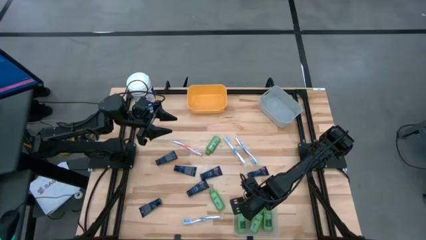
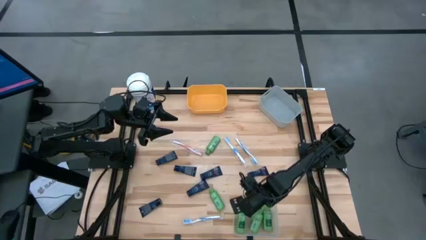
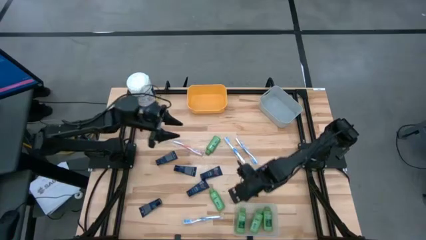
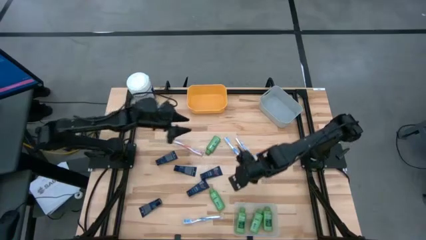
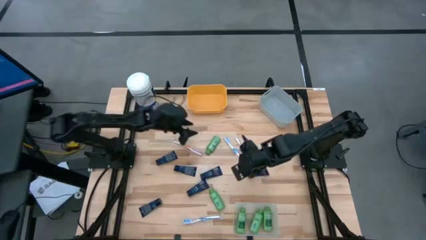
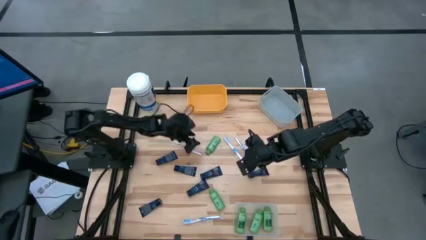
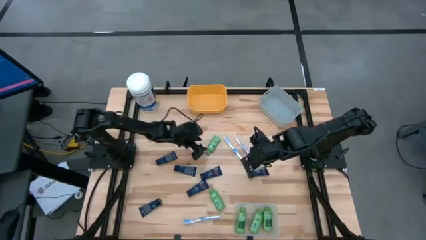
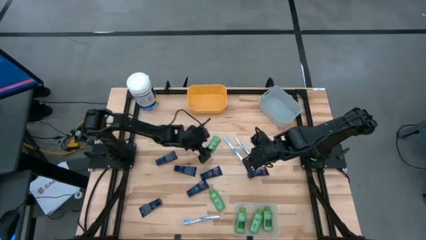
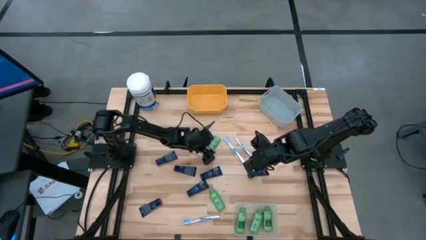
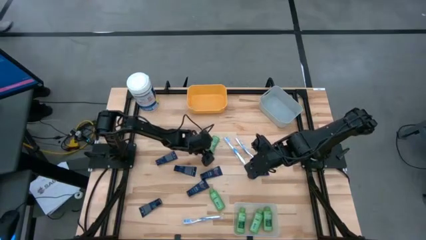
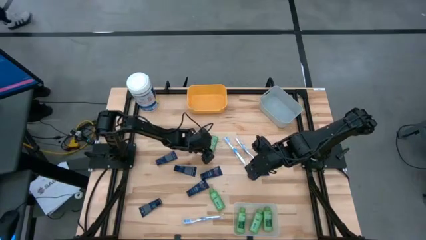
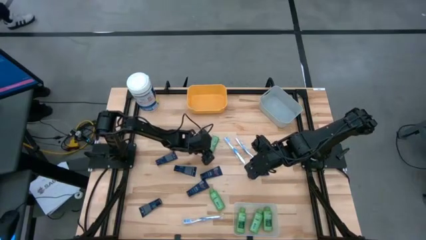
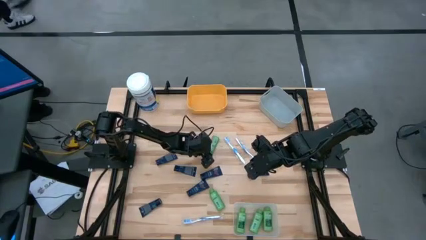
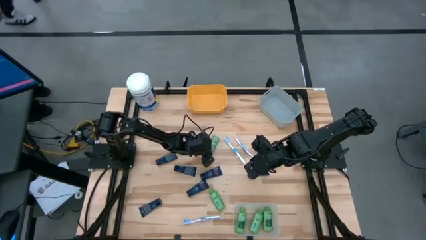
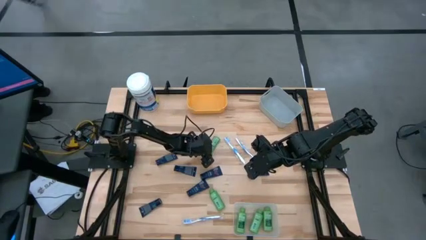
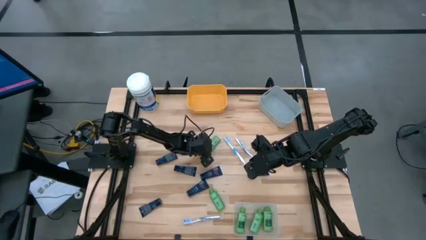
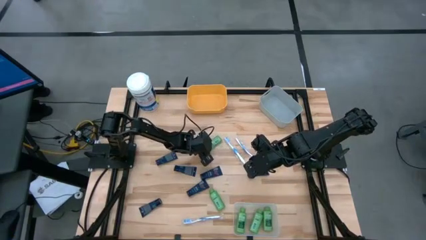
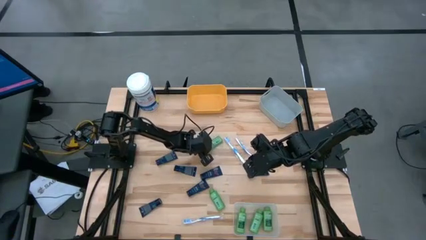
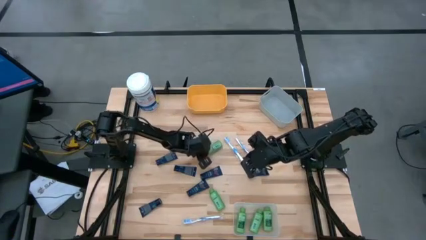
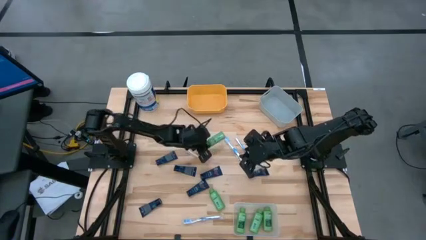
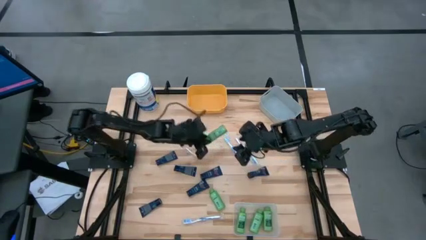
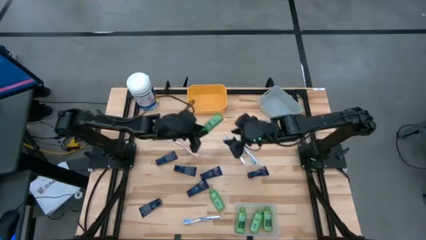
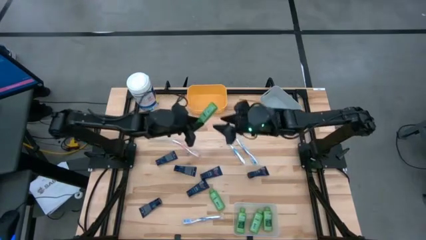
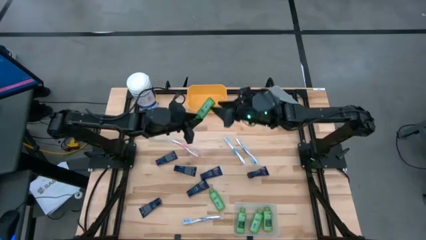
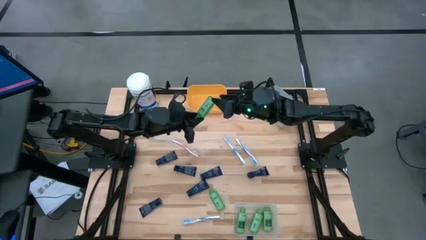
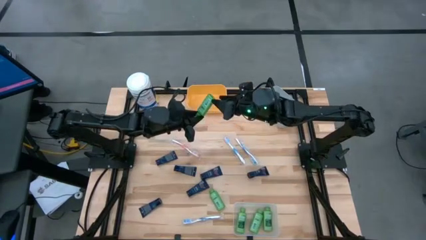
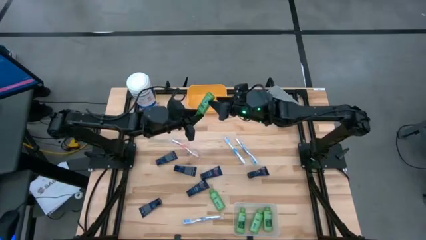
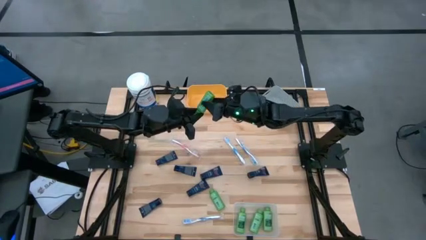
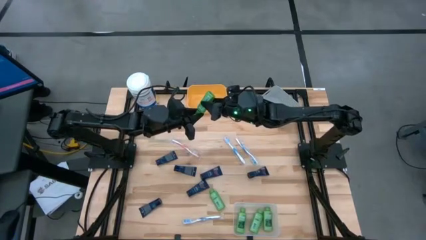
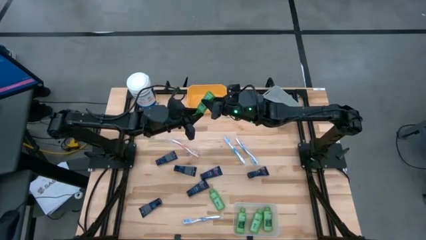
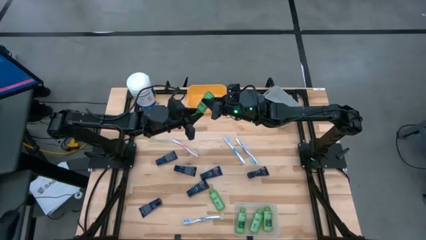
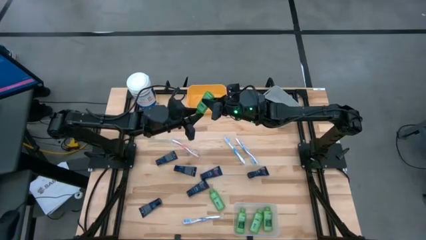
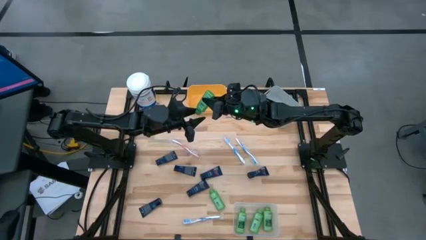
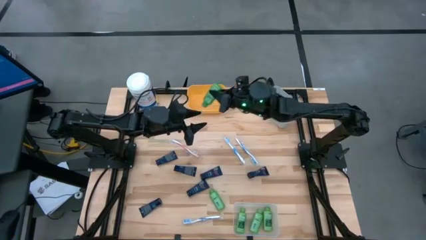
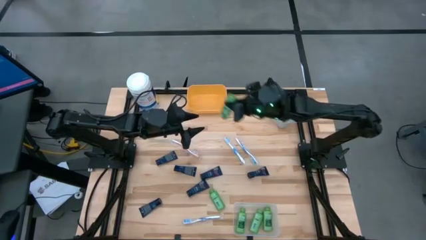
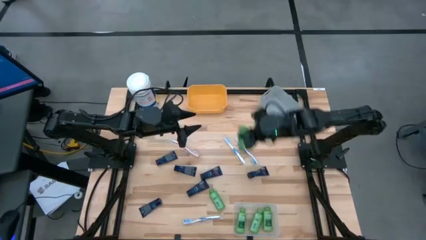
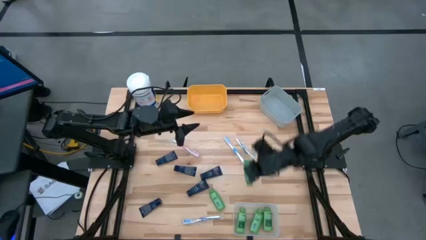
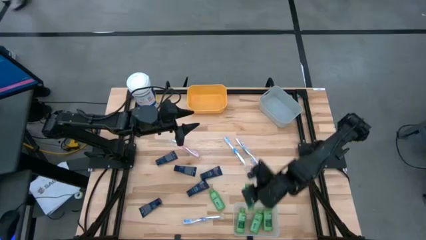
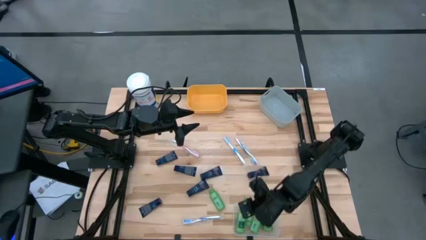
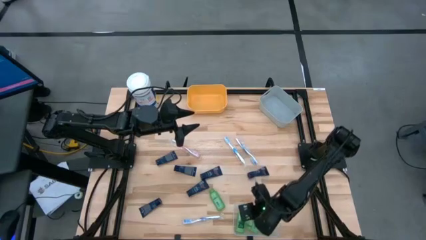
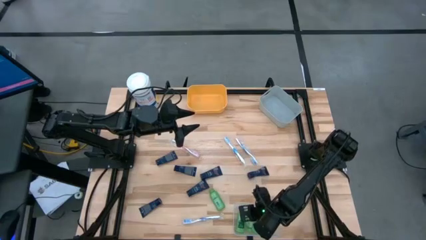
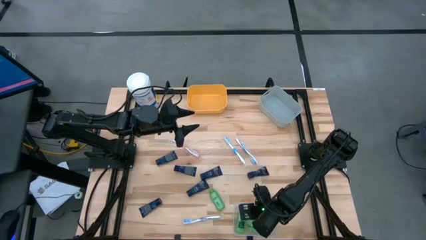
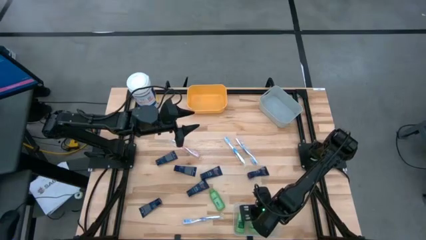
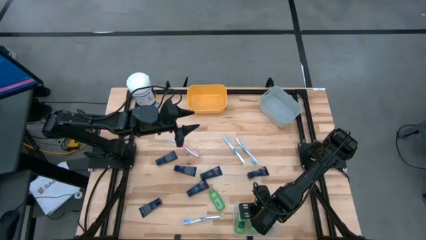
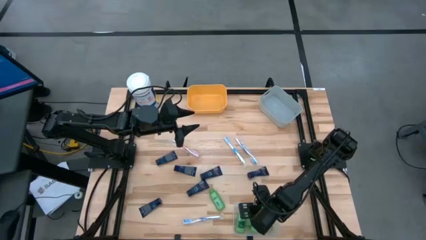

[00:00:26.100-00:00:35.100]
Task: Pick & Place Travel size toiletries
Put the green shampoo into the transparent bin

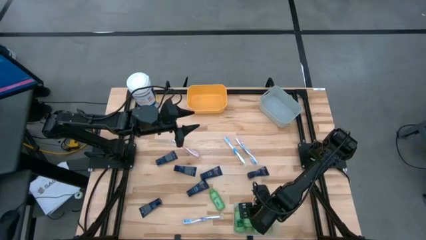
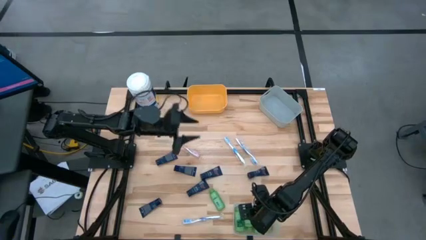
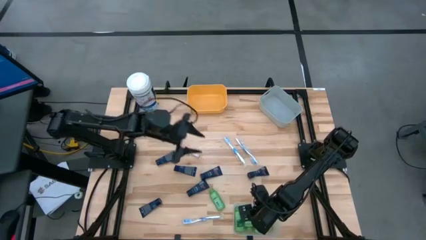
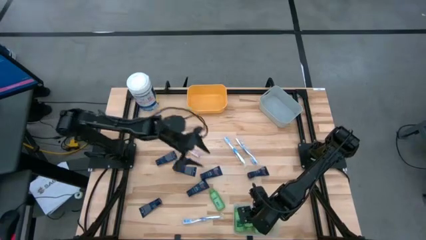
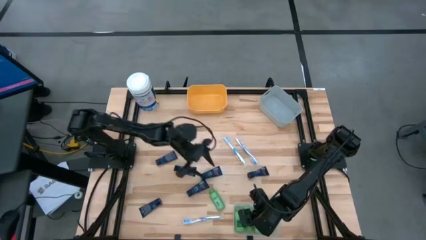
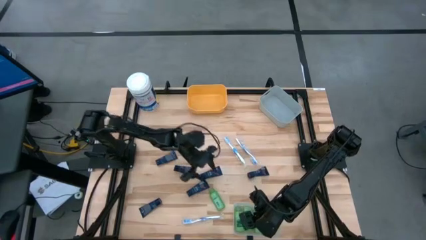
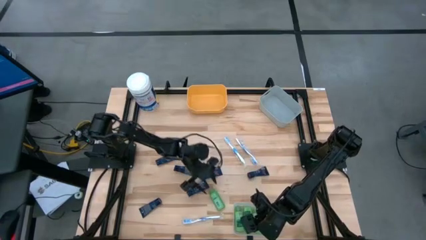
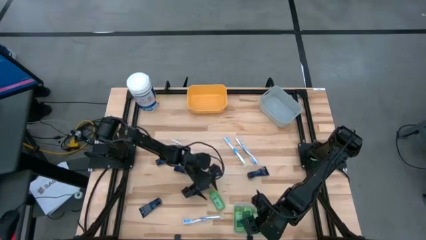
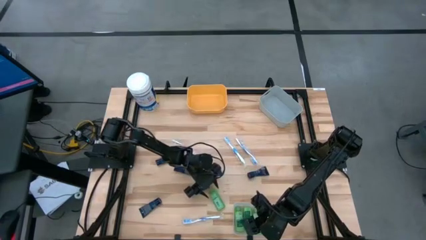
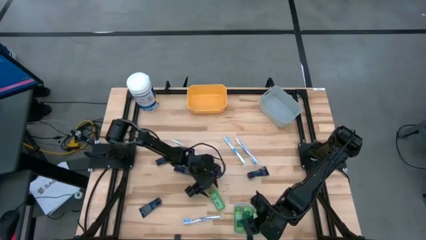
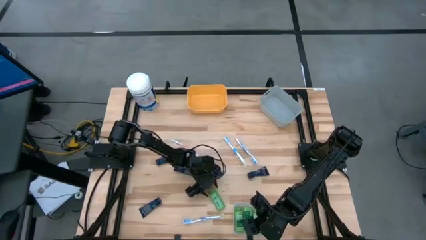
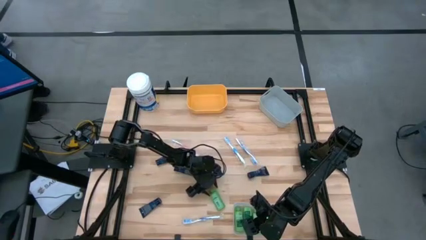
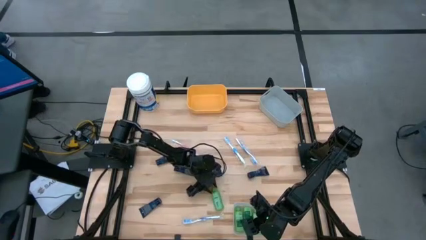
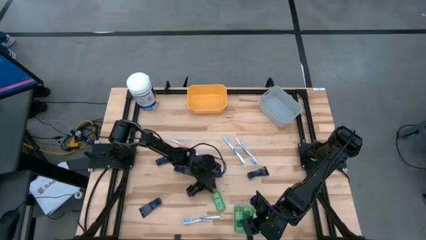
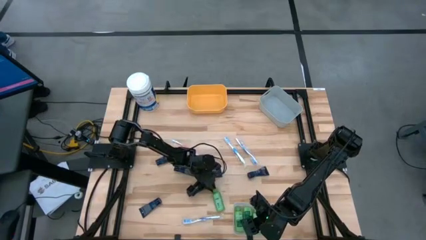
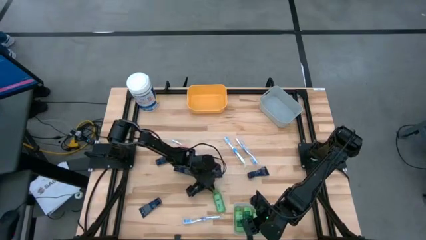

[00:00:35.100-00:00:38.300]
Put the green shampoo into the transparent bin

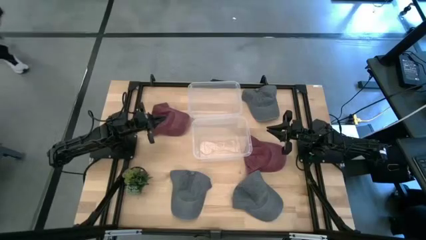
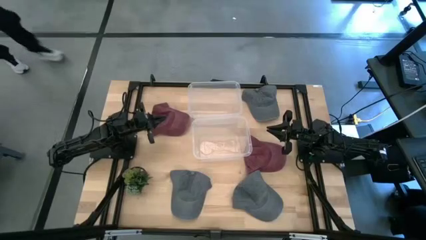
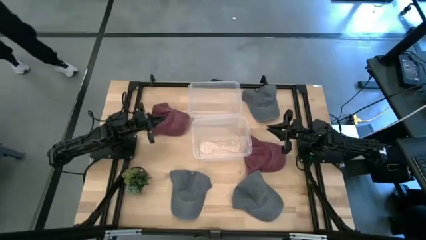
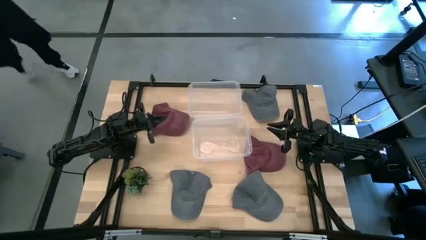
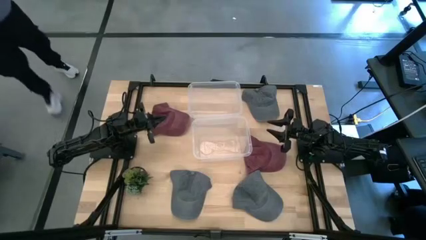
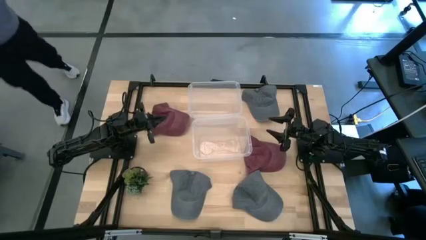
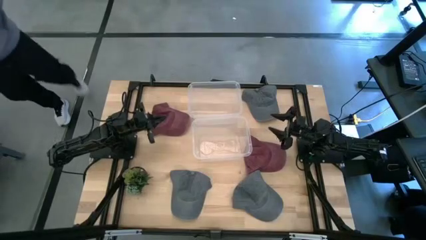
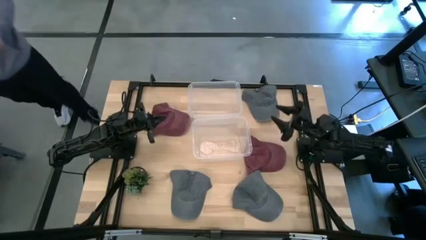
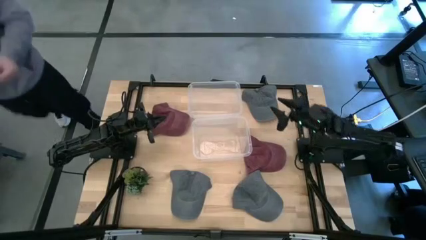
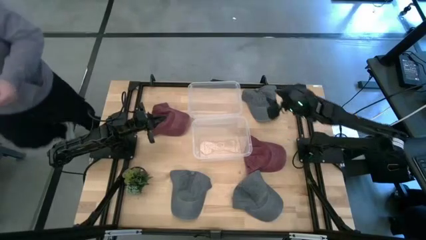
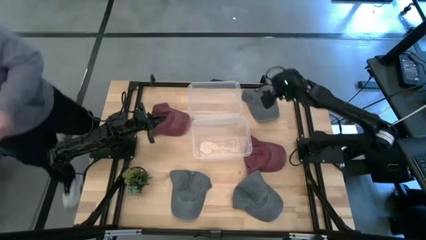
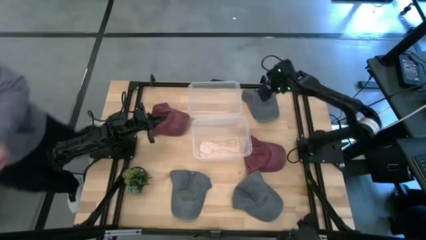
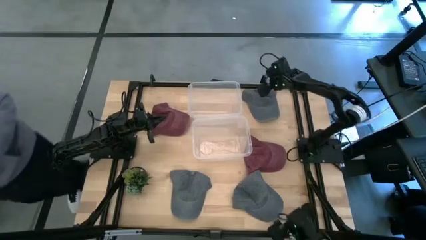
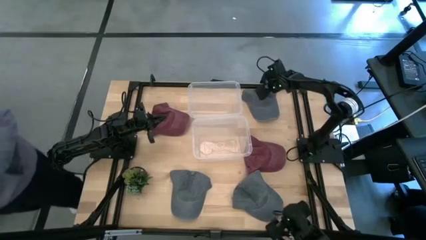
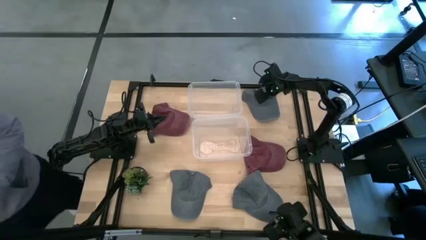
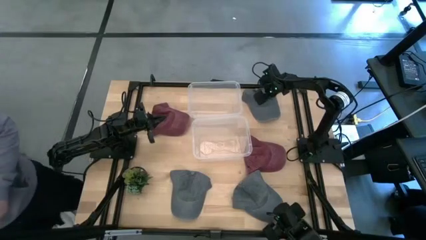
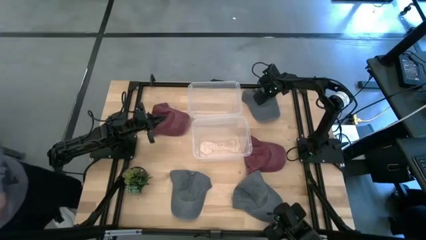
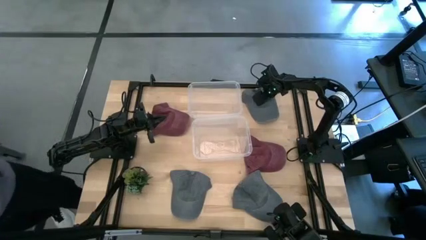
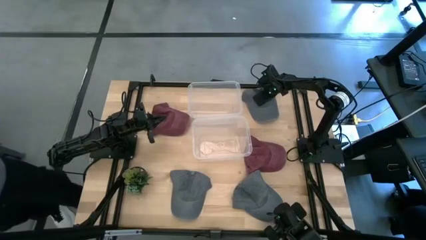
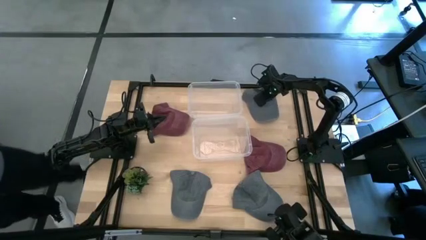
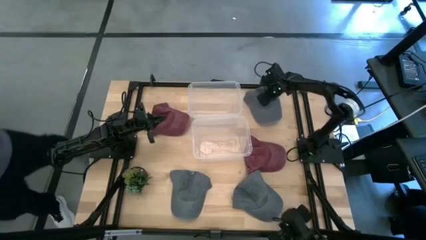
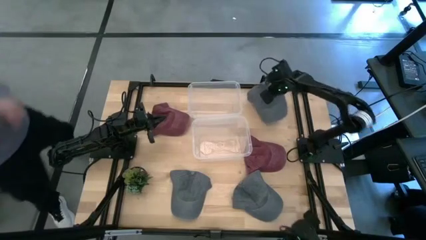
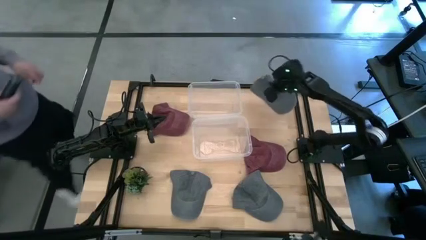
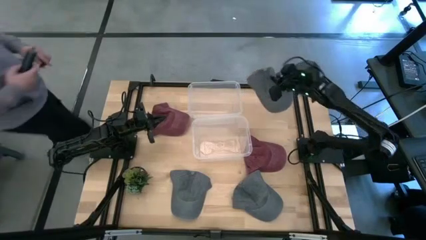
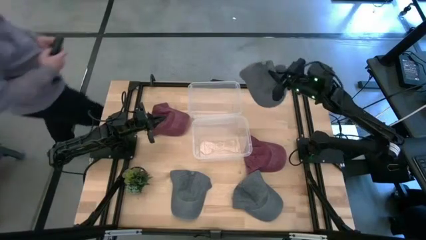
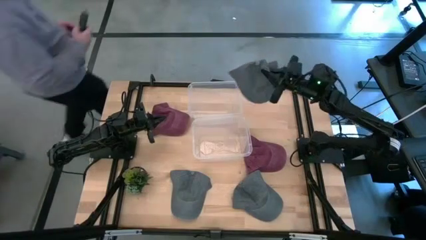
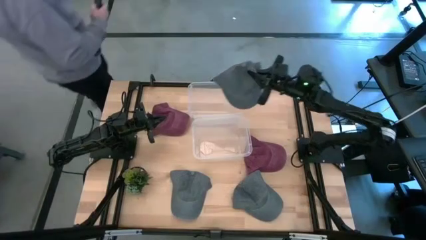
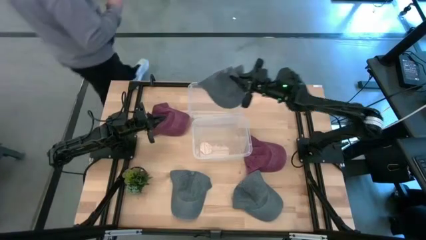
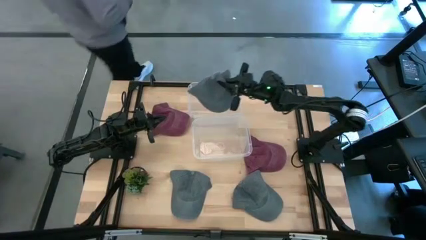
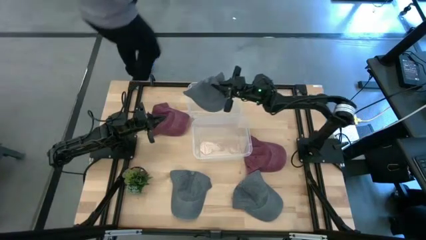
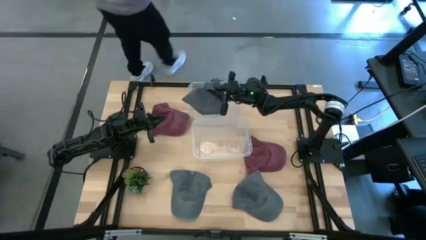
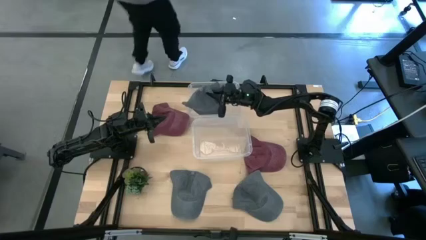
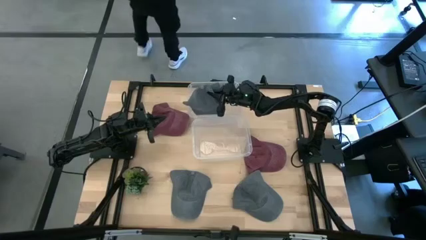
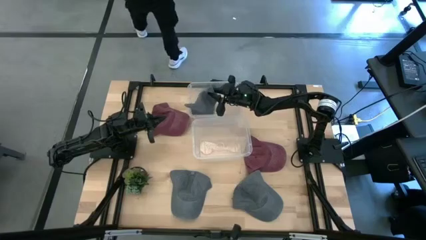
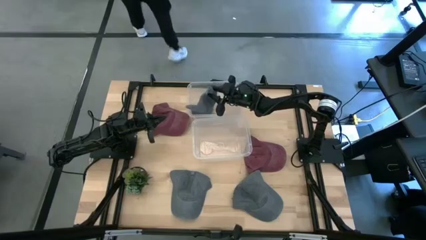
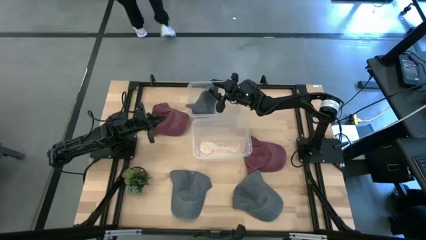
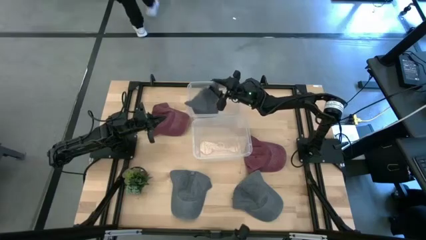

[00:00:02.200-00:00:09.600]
Task: Pick & Place hat
Put the top gray cap into the top transparent bin
